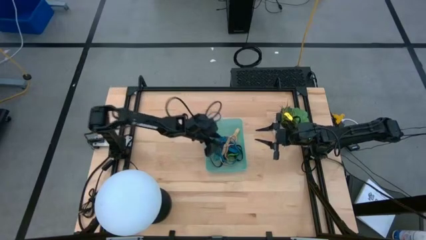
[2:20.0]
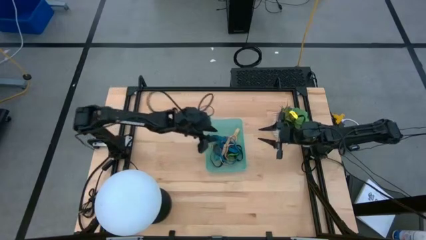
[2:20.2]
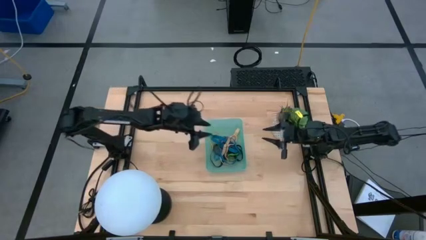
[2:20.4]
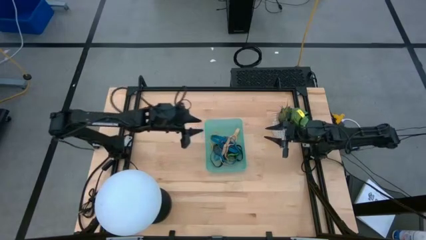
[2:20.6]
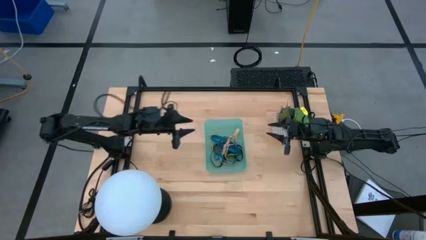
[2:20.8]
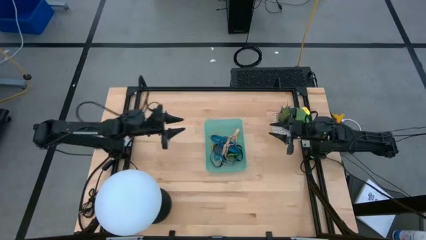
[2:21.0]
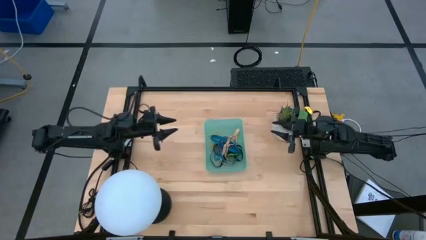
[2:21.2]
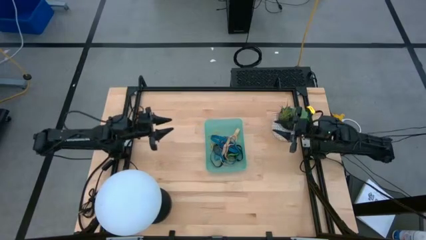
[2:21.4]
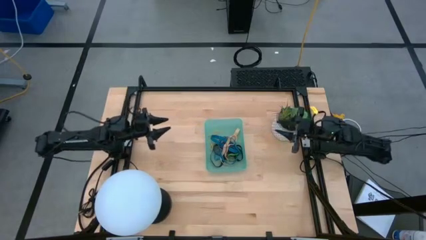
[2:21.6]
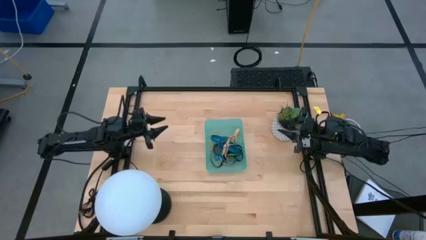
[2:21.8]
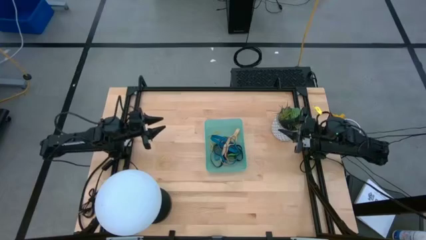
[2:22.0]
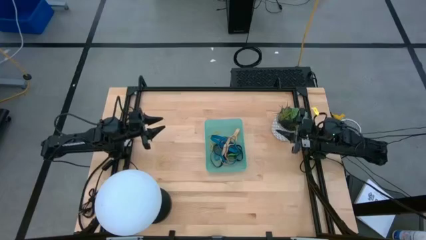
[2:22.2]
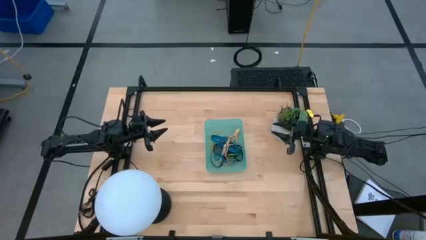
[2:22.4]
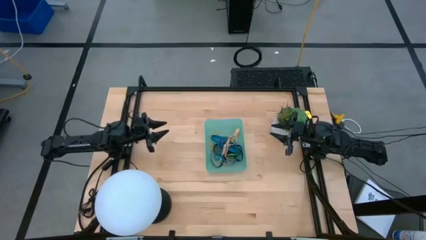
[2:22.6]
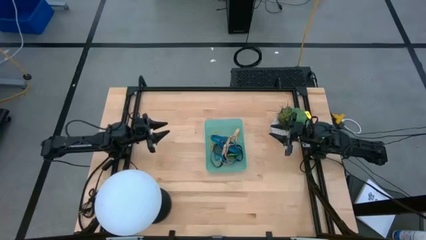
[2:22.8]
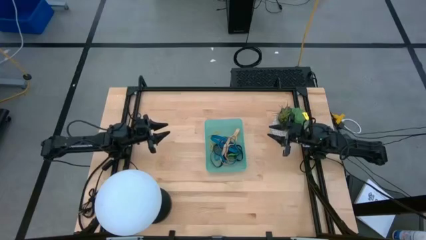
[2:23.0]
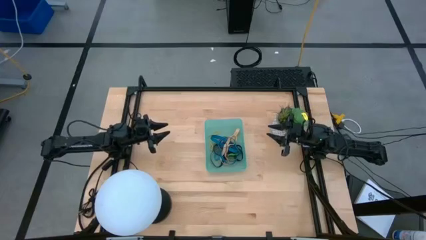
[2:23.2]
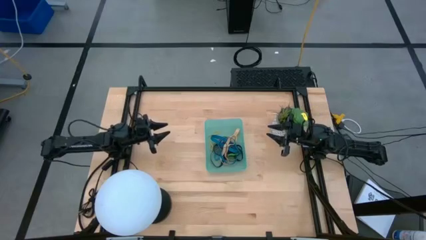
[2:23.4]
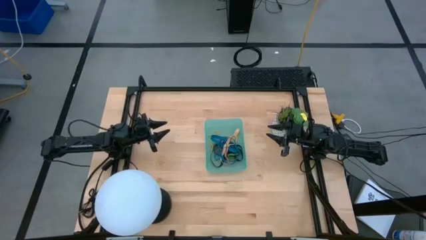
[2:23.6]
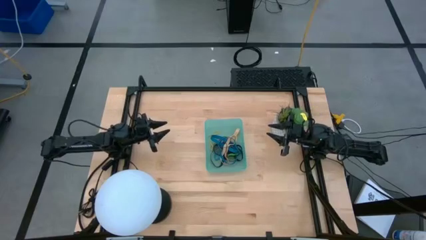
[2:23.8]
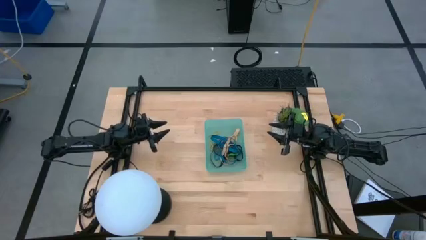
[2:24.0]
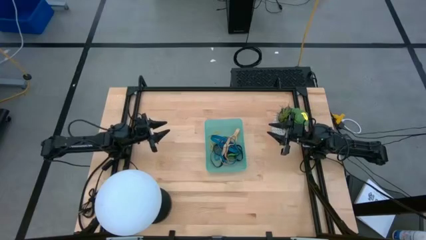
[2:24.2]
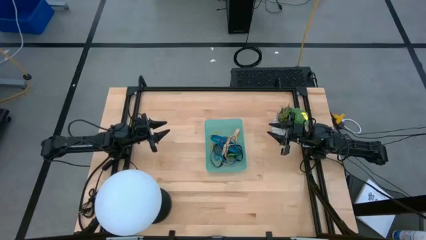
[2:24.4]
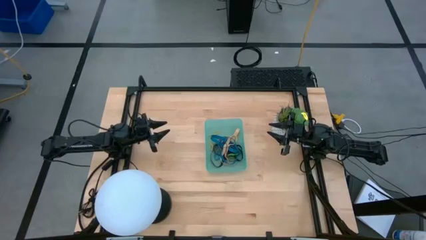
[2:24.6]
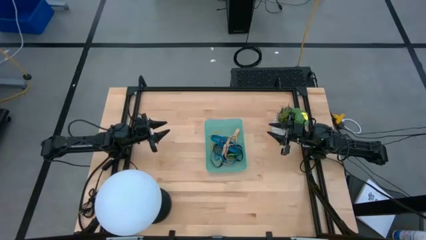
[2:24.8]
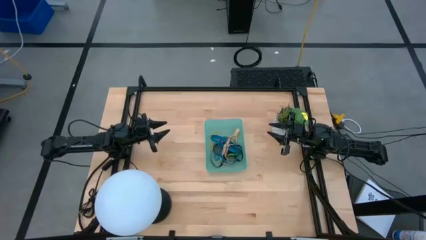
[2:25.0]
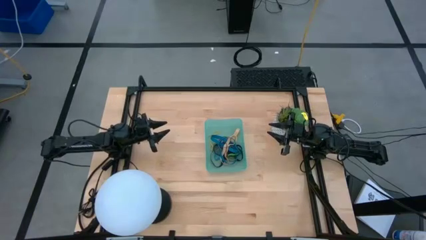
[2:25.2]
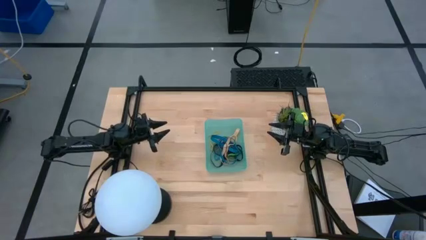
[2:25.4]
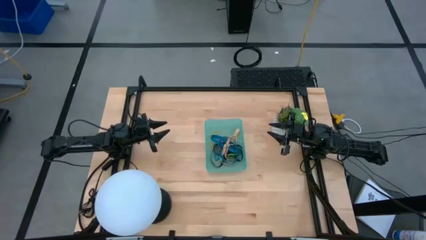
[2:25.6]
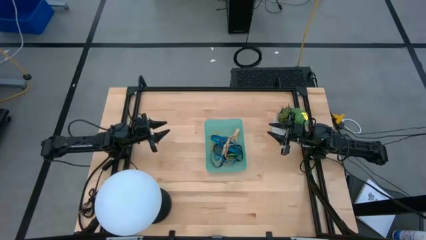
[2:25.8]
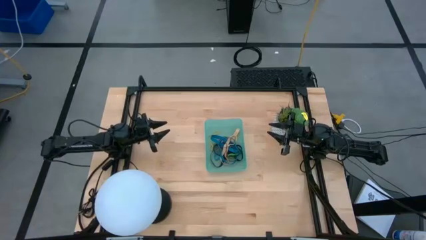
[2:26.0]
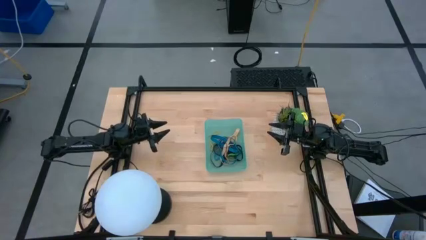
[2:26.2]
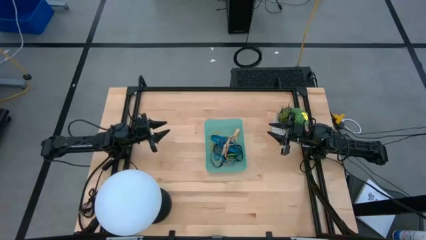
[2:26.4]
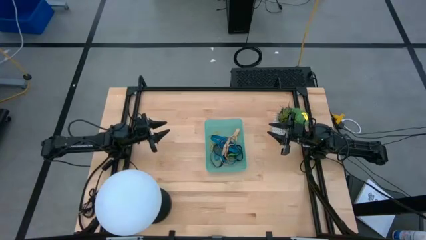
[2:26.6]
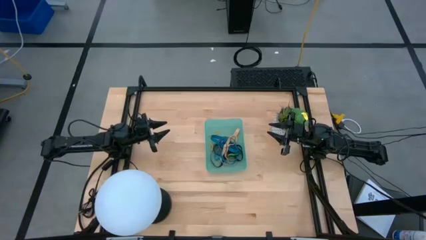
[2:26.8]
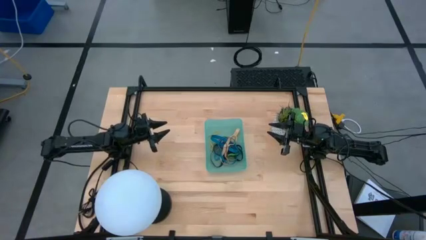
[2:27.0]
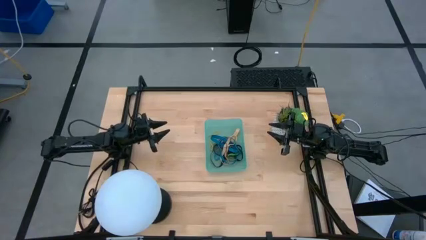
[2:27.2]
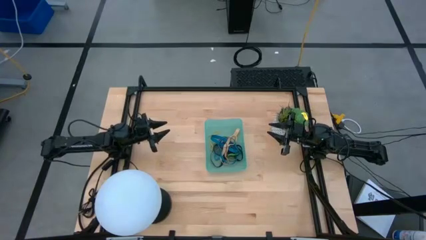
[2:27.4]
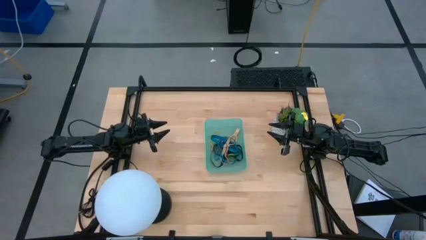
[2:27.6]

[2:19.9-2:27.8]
Task: Pick and place rubber bands into bin
Return to Home Position

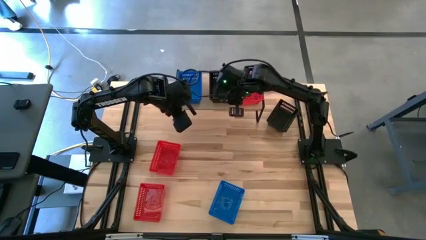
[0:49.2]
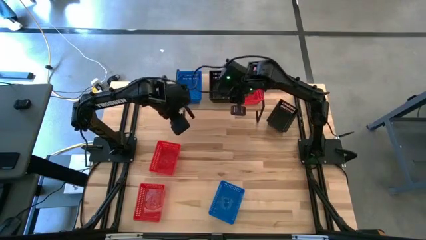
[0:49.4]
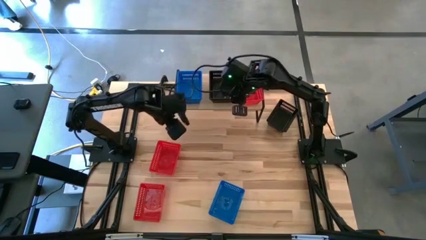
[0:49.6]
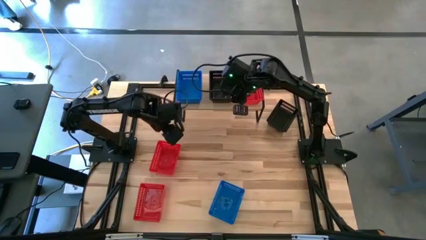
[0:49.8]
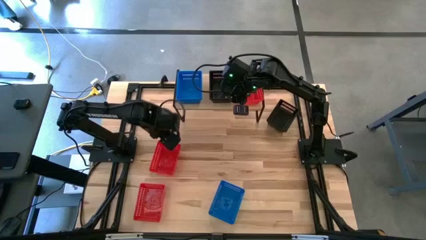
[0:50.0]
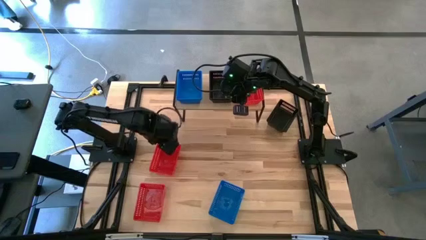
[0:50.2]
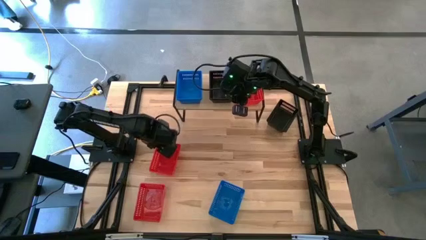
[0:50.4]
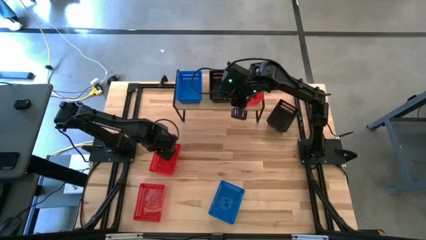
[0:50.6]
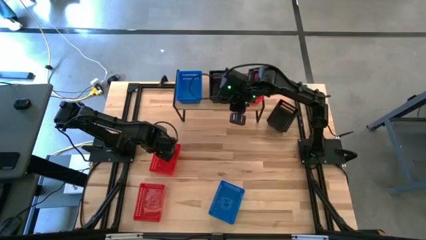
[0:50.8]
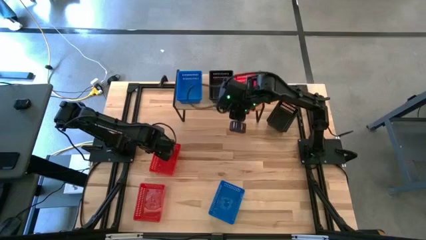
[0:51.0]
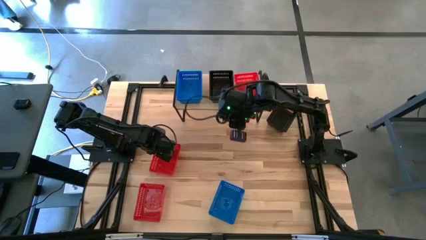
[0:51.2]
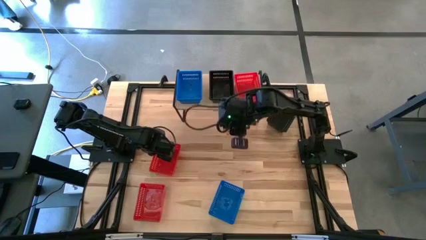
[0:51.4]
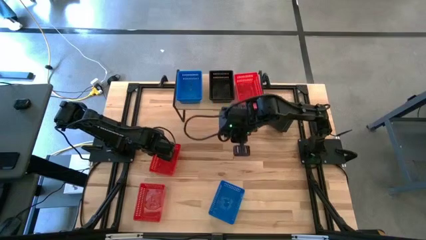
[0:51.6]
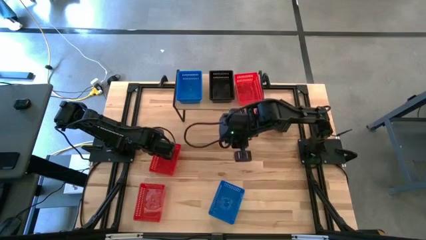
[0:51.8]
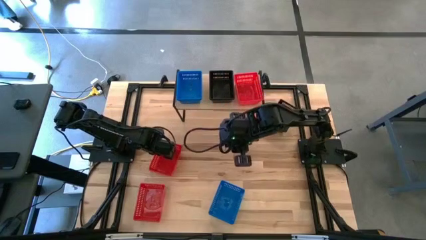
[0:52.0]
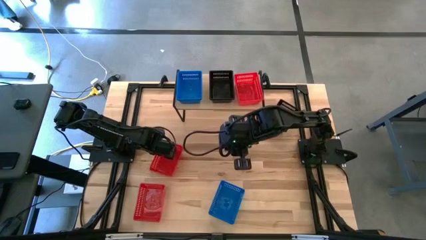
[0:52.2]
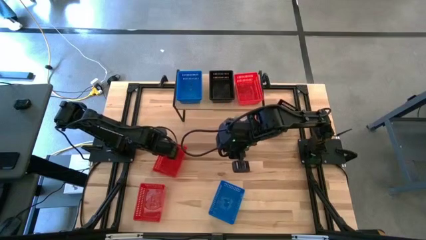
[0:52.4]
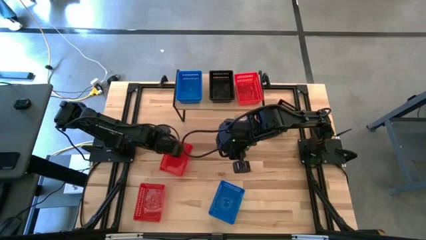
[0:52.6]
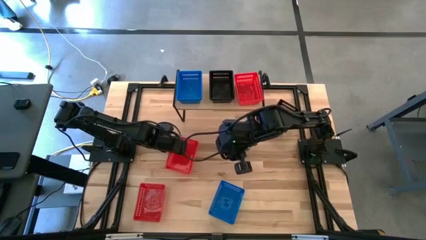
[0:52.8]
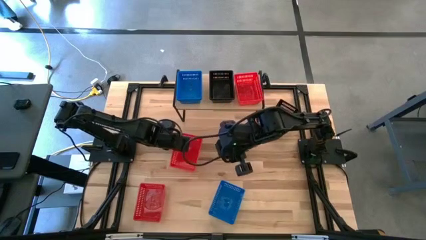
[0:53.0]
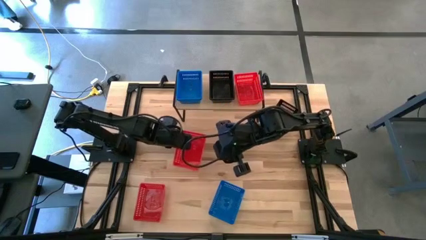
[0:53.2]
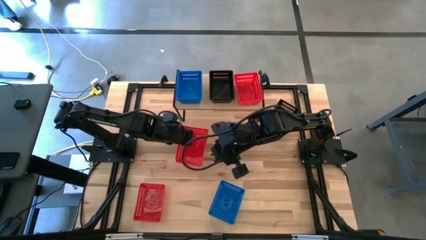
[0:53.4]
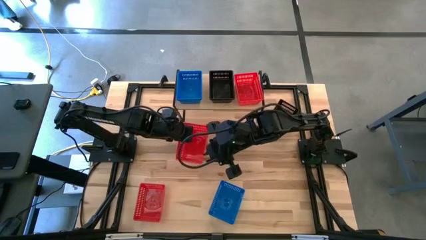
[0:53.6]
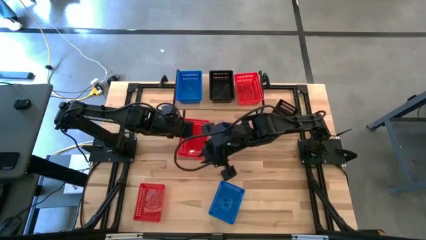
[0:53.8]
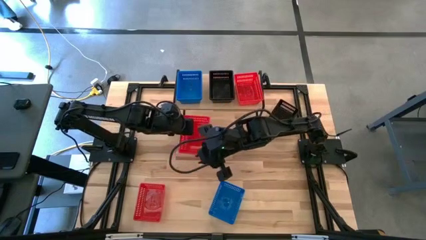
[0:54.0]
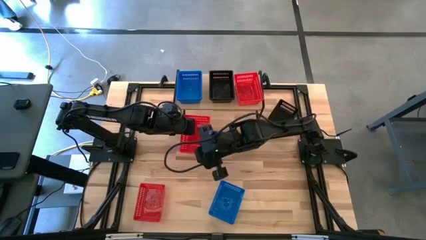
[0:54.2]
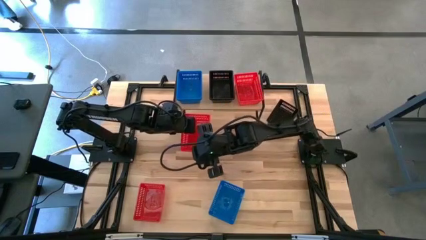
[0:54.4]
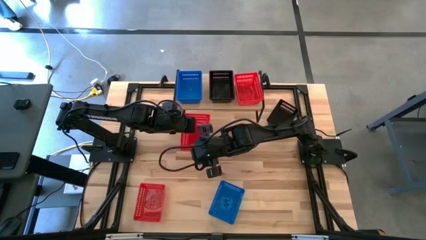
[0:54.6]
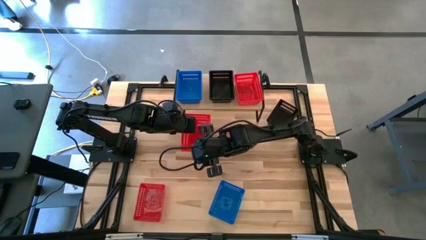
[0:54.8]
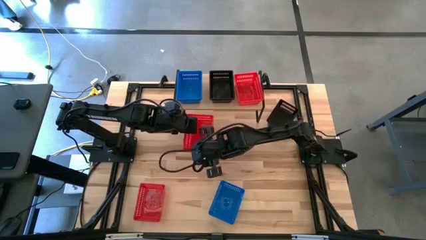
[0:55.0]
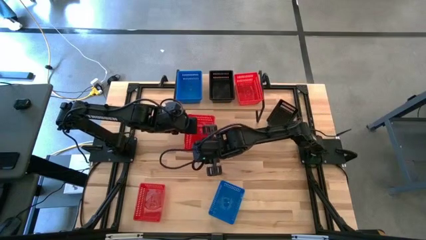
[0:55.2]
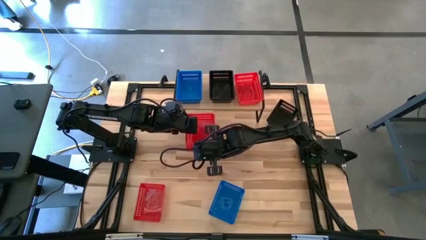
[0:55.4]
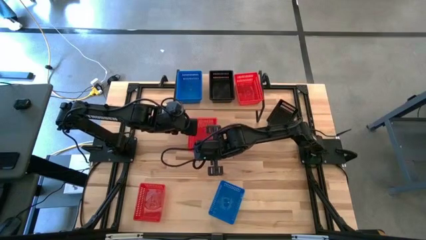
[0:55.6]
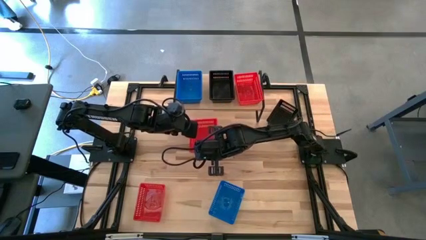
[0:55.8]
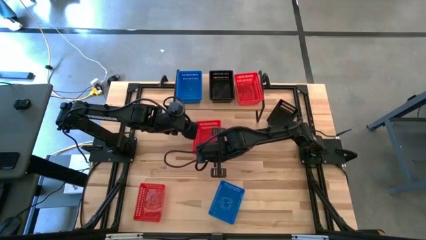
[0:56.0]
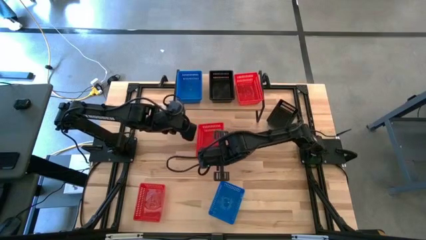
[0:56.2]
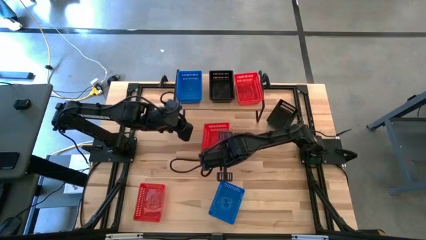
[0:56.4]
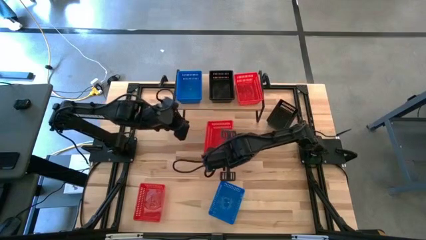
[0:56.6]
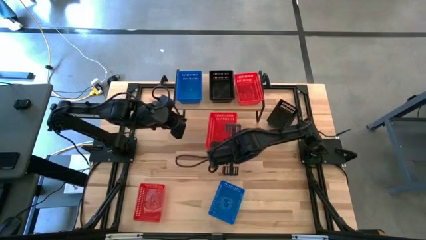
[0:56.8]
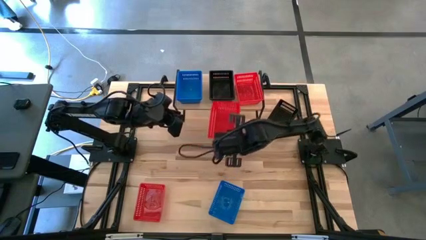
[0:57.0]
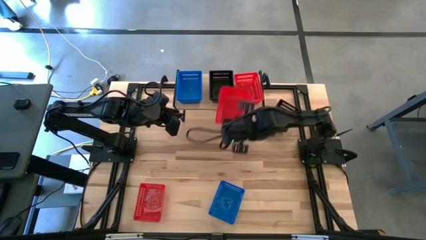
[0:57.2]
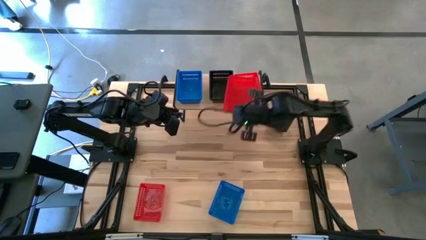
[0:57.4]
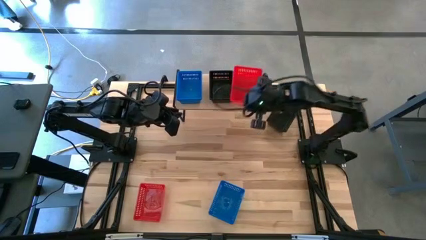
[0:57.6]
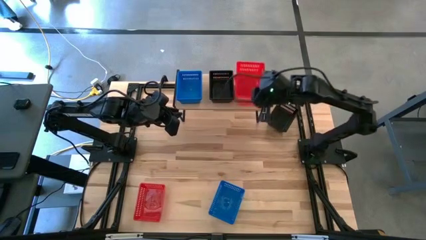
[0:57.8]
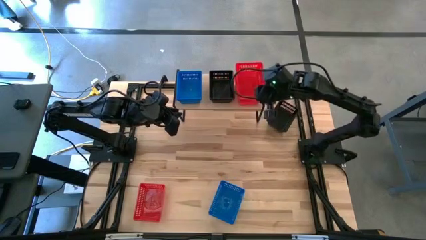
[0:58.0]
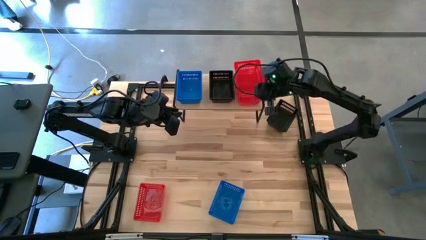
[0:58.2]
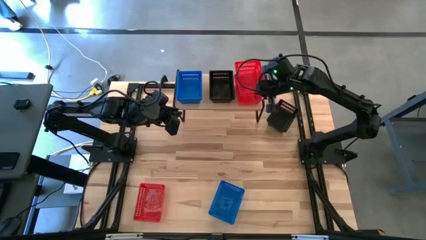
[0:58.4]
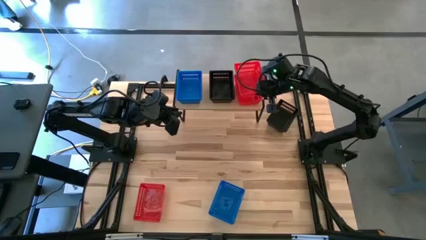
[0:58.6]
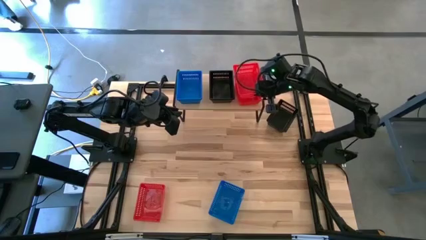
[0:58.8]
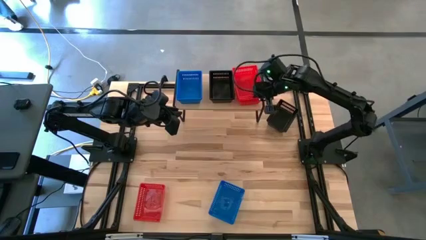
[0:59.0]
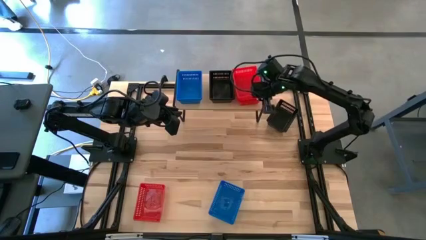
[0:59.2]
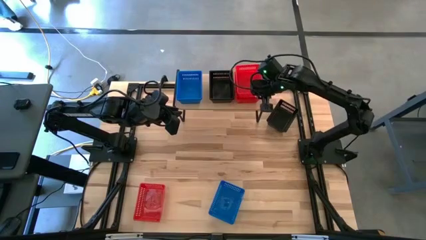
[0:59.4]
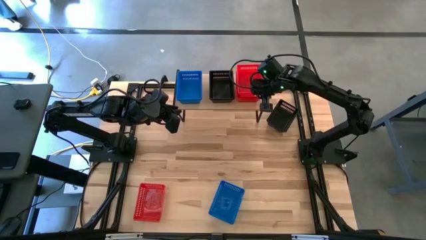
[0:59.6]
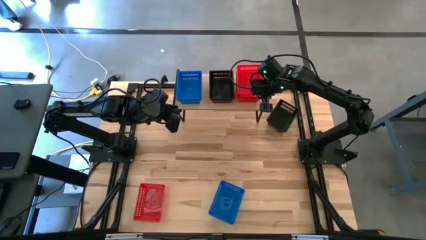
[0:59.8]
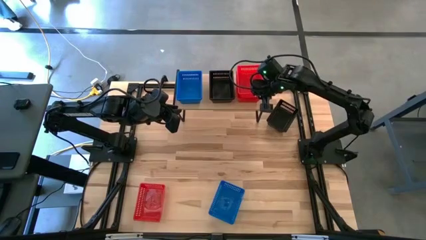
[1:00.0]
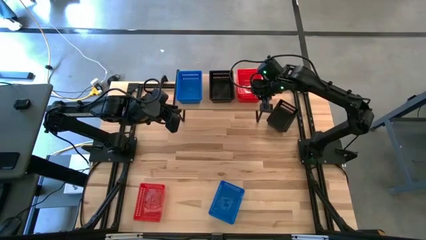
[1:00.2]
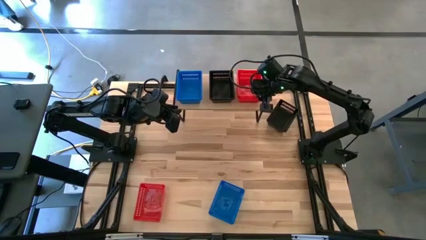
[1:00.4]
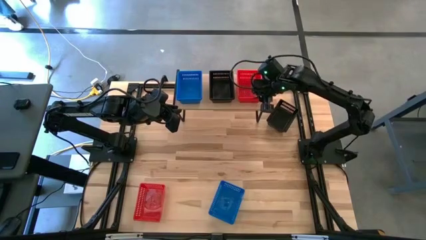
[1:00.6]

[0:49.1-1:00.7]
Task: Stack baskets on shelf by color
Stack the top red bin on top of the other red bin on the shelf
